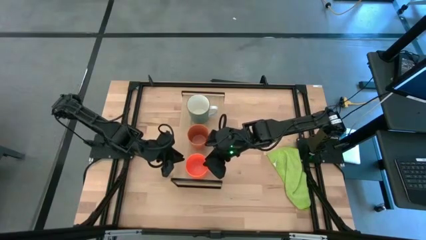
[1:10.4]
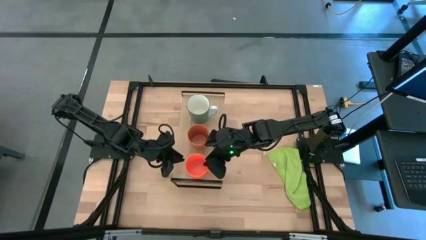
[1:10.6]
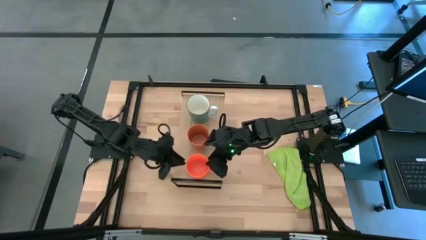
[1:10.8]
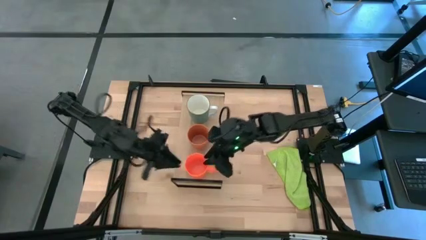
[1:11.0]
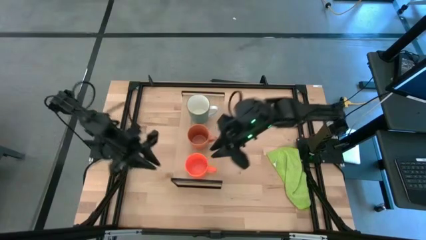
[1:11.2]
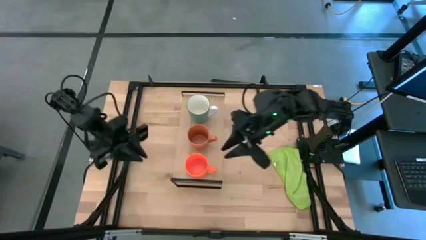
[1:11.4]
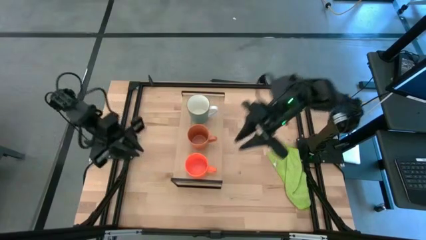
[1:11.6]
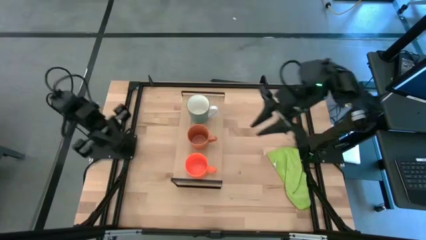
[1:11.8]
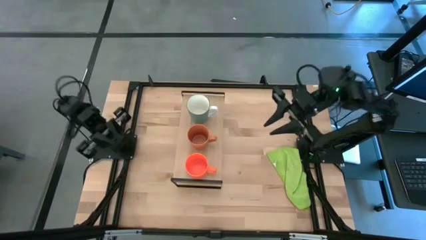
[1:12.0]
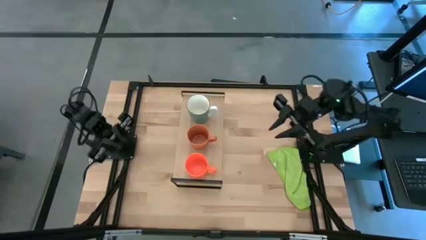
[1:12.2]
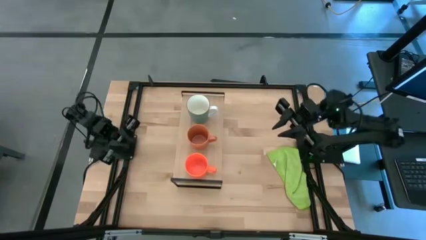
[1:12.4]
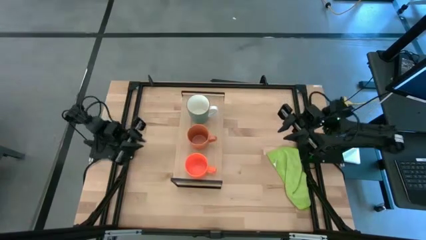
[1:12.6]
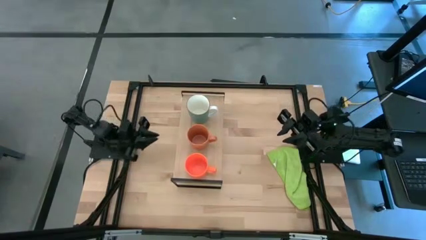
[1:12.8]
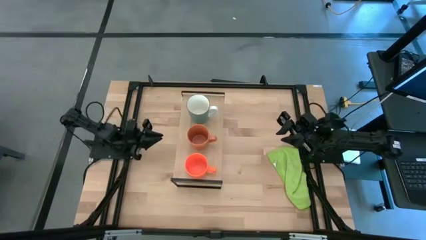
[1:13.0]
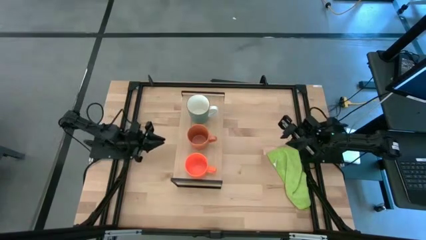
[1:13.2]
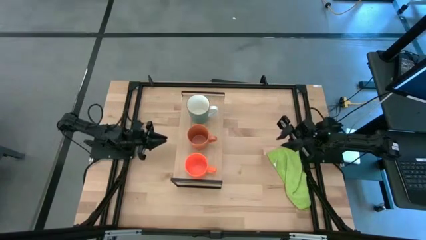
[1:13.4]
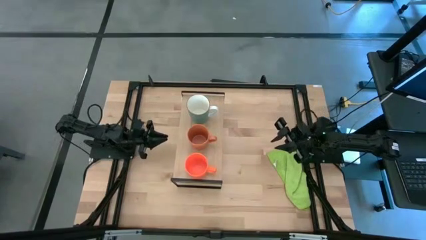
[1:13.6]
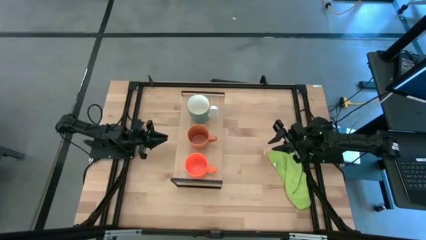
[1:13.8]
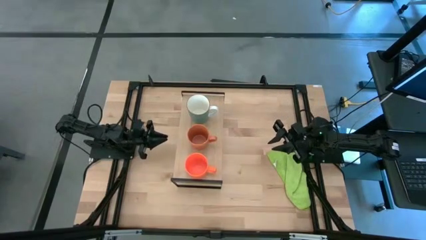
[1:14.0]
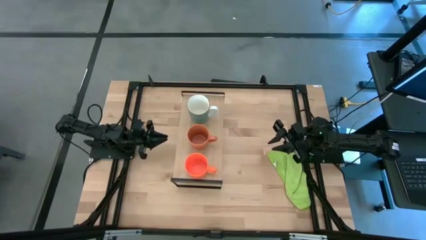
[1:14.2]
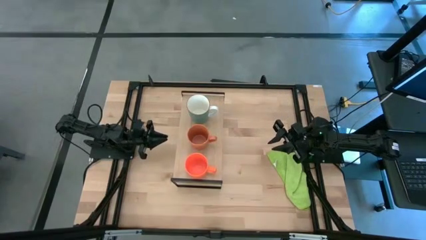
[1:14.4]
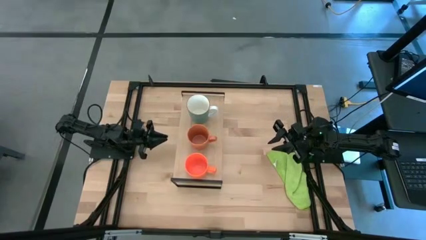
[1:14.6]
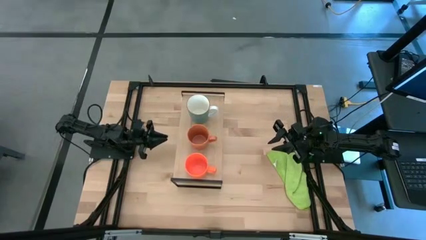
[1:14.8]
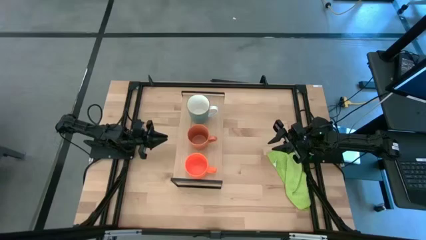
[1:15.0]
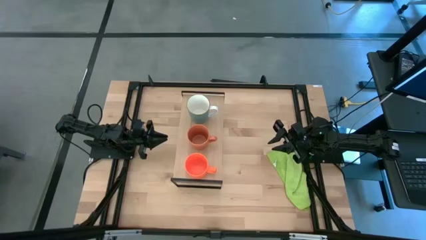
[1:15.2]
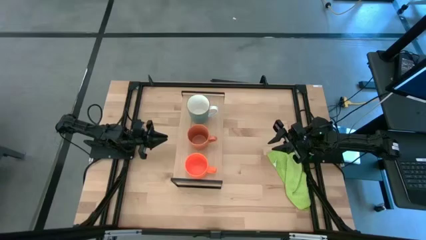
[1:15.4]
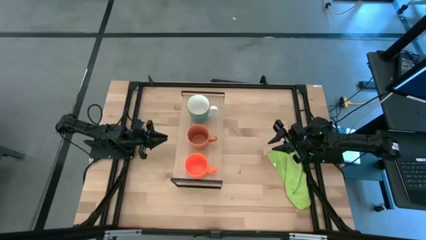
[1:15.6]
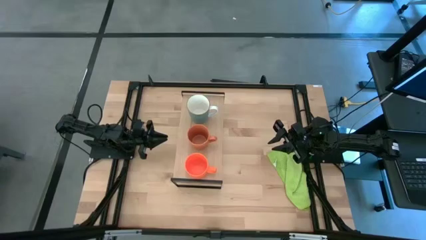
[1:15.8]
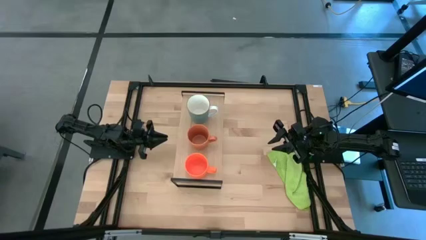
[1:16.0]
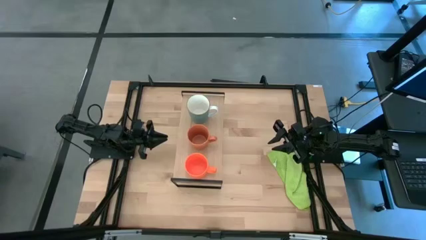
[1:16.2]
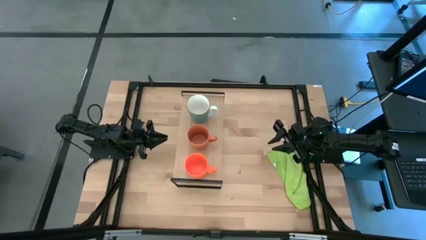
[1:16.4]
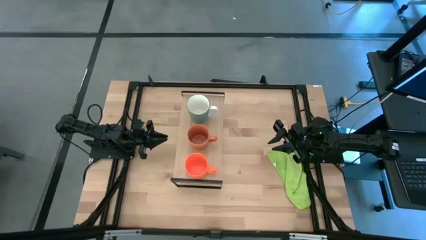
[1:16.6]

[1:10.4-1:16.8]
Task: Stack small to large cups/mugs on shelf
Return to Home Position

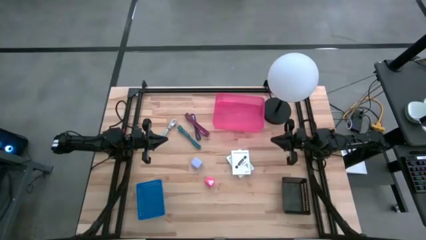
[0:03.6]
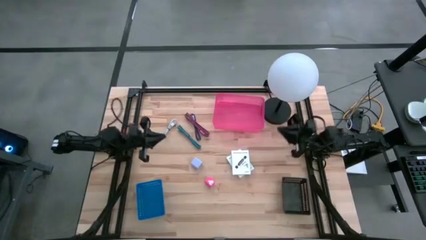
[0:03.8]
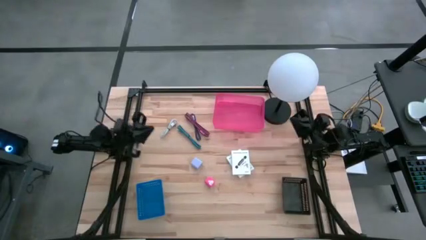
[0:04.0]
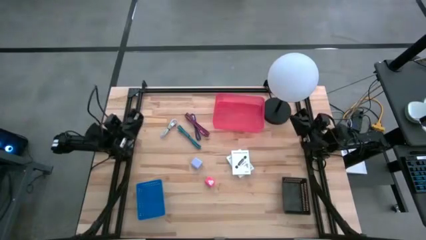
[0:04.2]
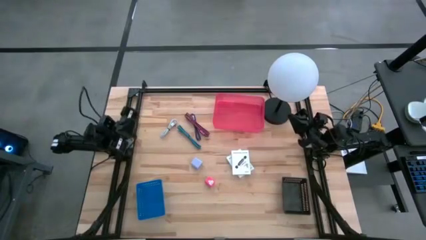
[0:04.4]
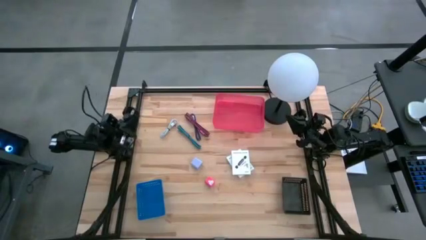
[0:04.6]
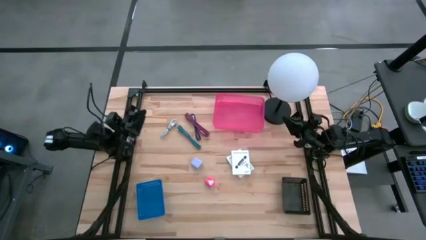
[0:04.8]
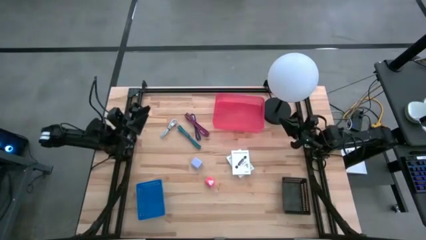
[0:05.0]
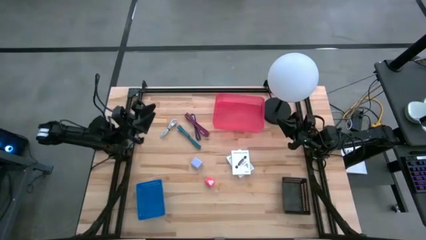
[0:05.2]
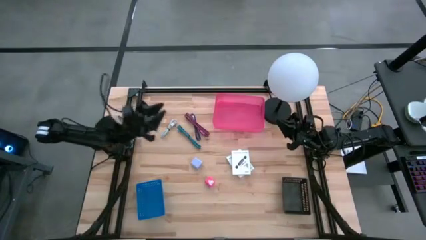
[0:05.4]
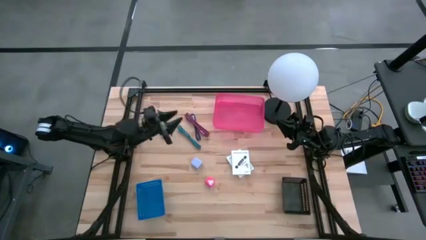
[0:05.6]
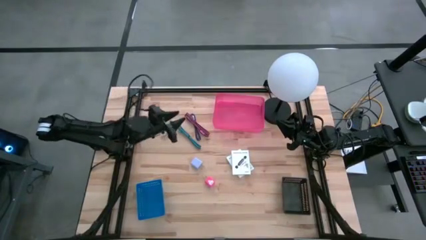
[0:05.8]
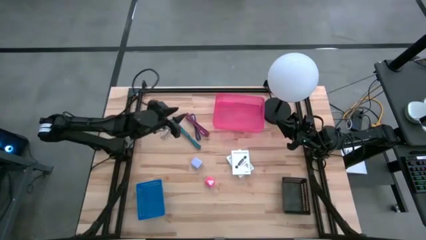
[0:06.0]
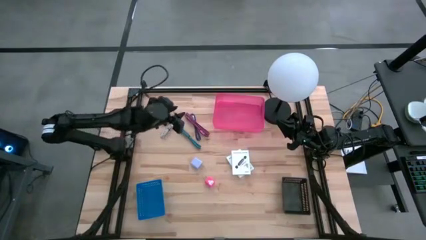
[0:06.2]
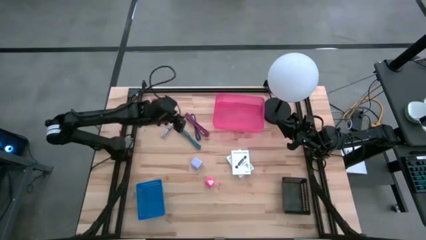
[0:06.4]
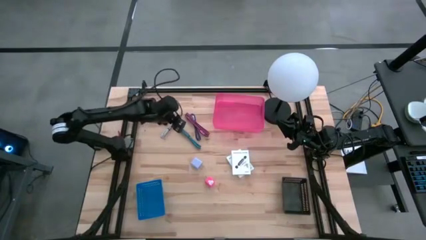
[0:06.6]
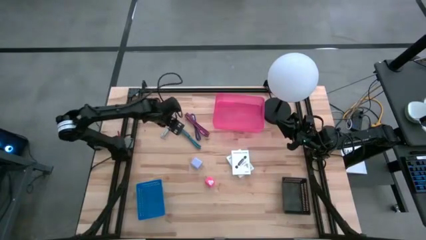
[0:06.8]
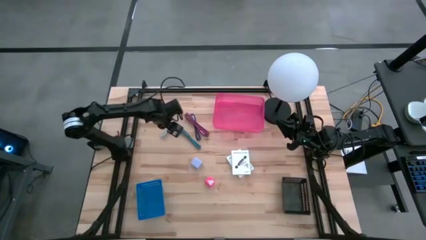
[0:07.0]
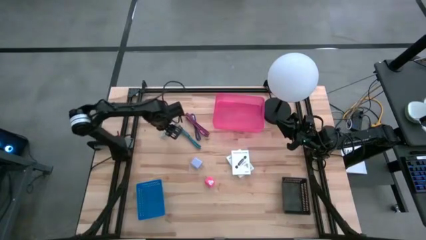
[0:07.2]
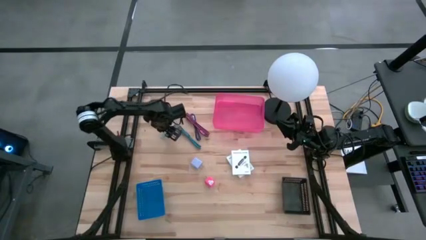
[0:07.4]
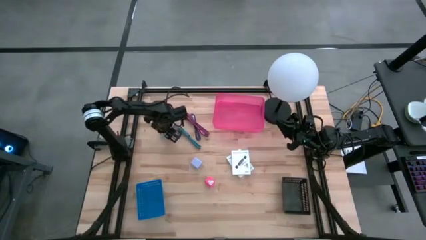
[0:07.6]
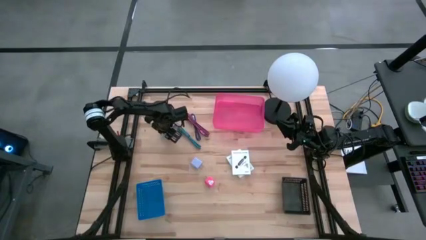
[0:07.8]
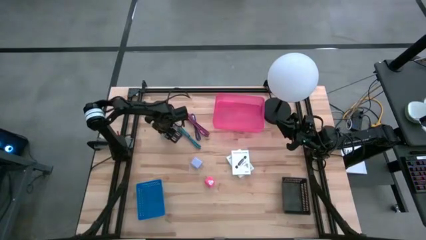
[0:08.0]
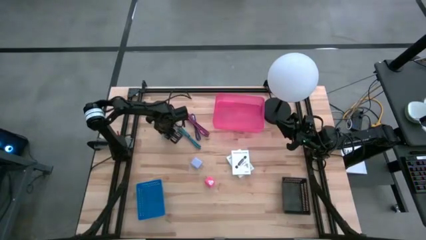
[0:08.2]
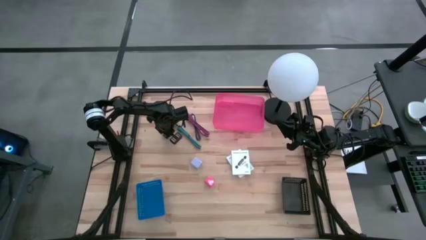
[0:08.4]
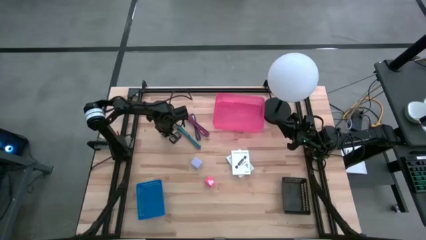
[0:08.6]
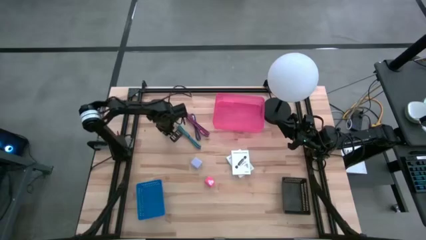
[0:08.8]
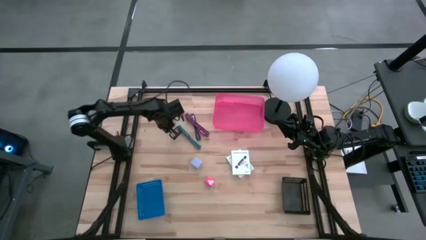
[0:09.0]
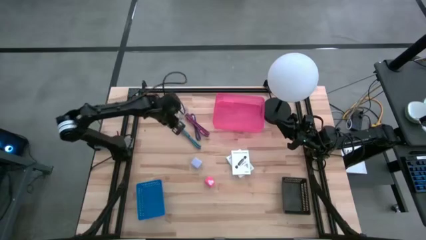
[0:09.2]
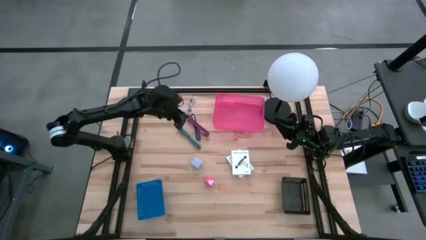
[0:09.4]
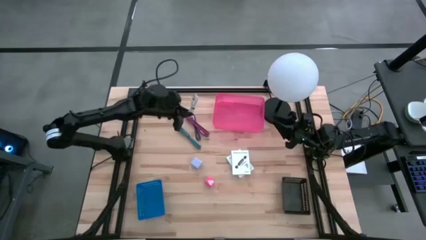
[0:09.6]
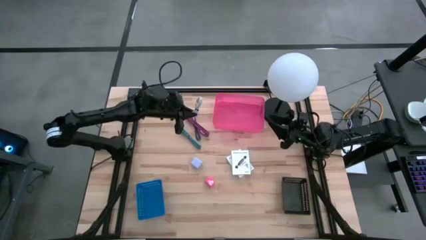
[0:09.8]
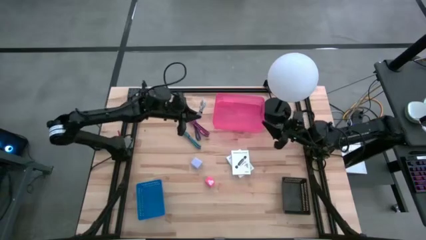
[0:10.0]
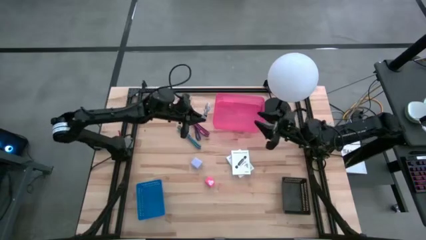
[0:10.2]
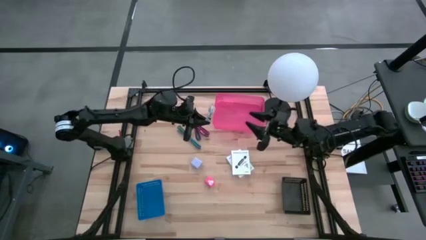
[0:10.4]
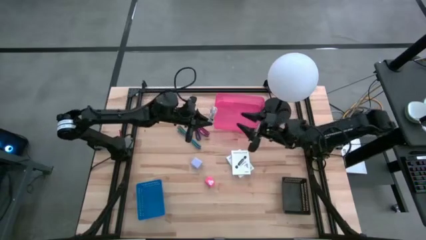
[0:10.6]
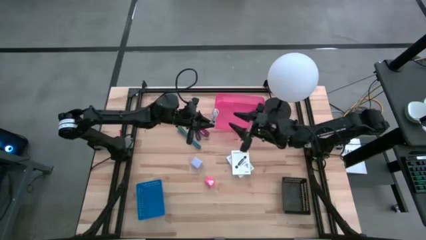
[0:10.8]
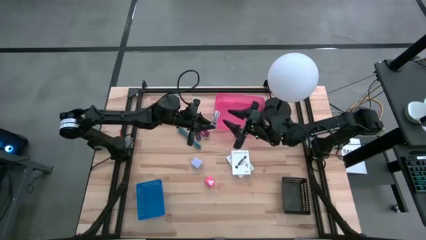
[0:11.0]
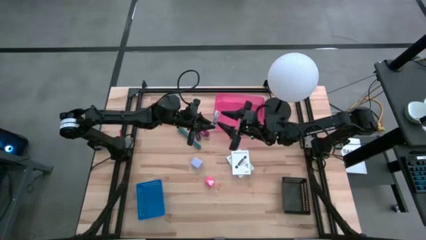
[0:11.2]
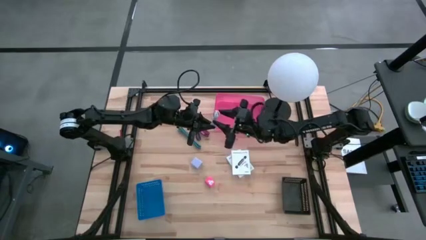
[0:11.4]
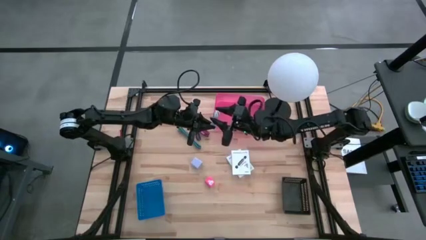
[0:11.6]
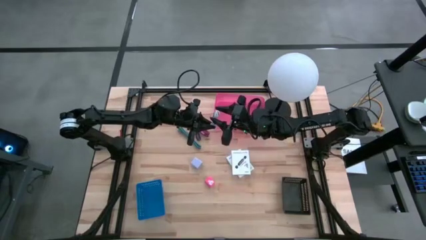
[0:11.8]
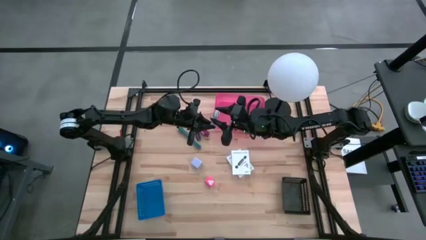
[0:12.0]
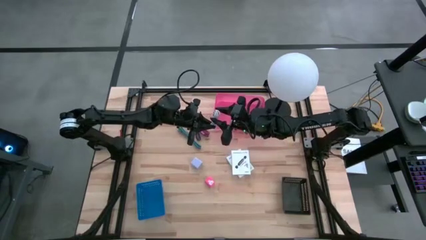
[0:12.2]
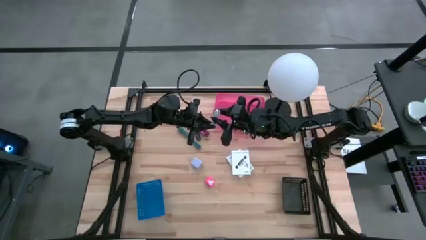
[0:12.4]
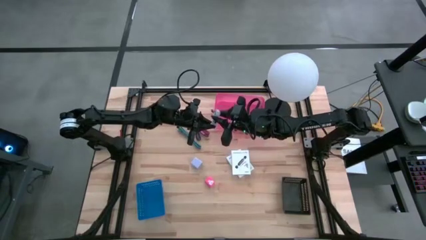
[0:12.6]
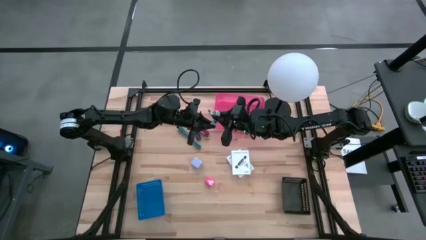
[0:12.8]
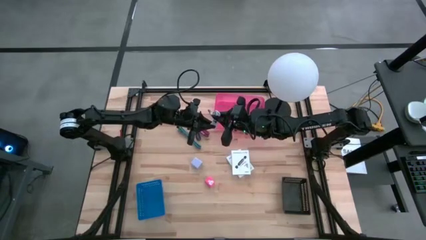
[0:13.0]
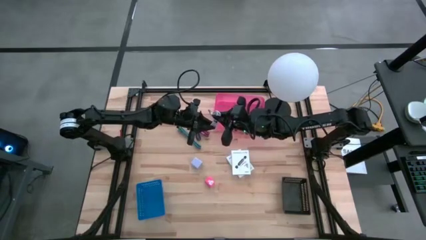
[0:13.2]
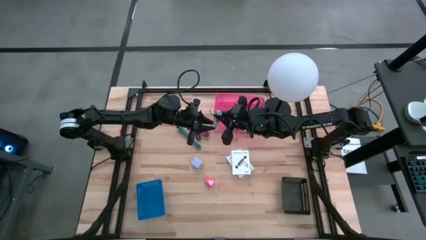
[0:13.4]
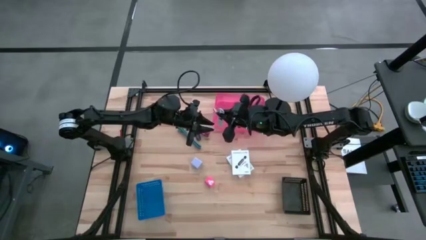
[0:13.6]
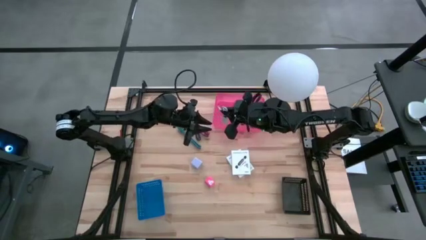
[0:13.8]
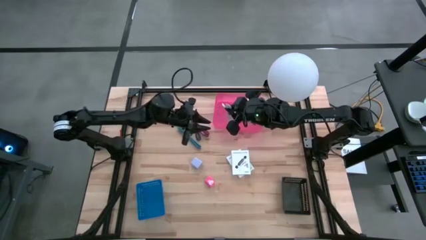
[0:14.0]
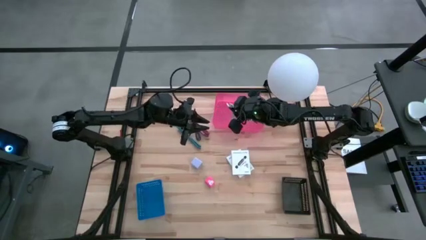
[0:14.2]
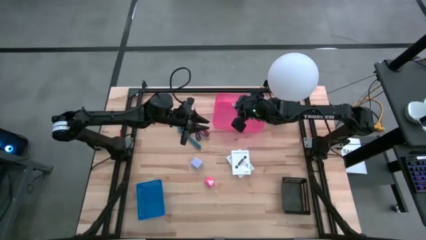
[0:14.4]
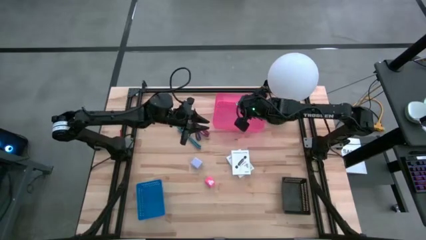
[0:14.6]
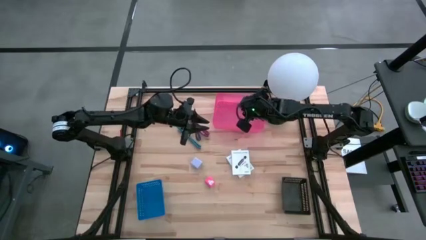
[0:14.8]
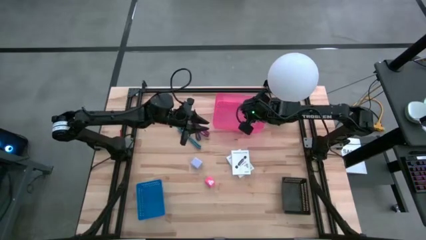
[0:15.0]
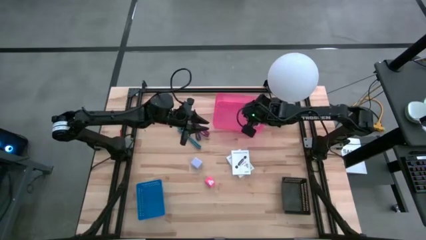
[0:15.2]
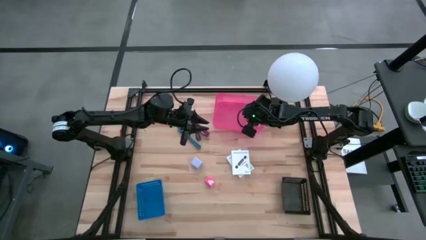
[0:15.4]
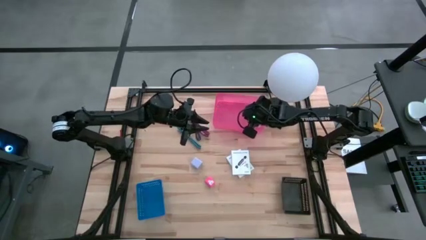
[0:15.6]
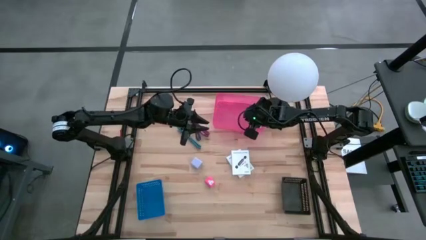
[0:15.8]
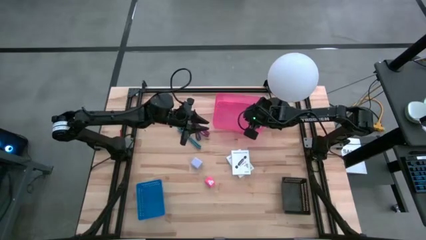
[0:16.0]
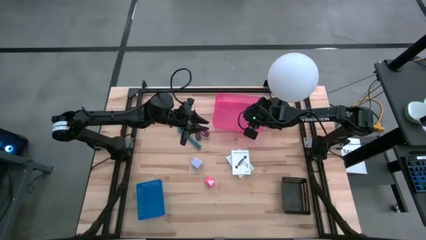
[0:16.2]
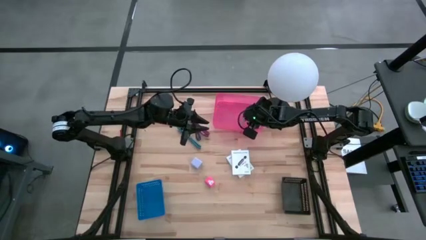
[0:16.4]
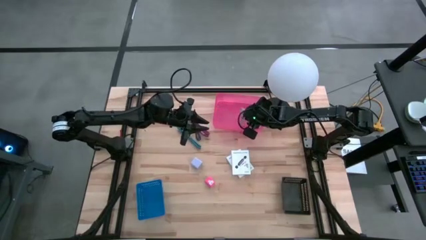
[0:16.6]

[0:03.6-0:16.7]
Task: Pick and place items into bin
Put the white charger cable into the pink bin
